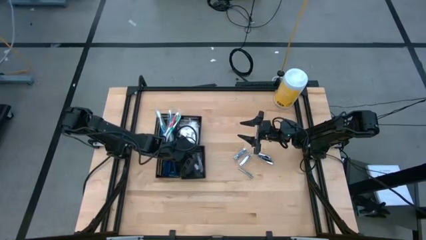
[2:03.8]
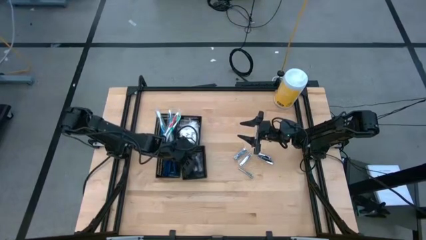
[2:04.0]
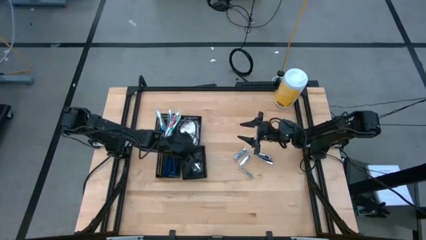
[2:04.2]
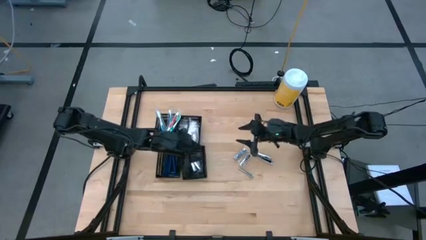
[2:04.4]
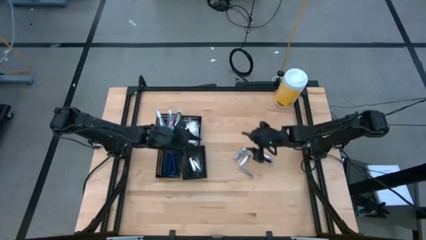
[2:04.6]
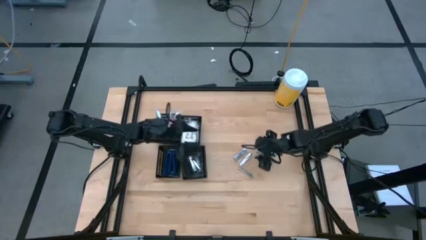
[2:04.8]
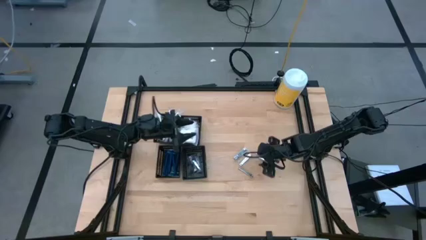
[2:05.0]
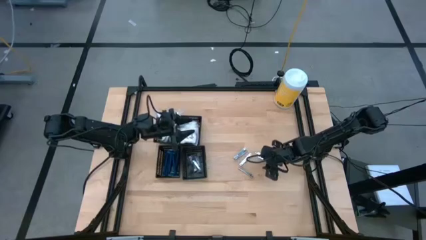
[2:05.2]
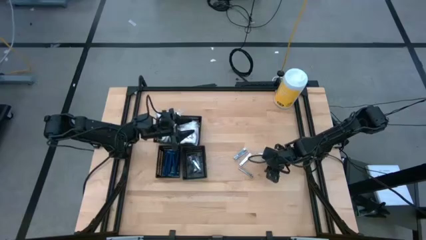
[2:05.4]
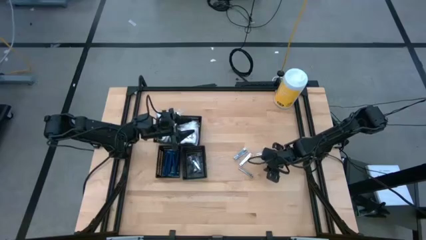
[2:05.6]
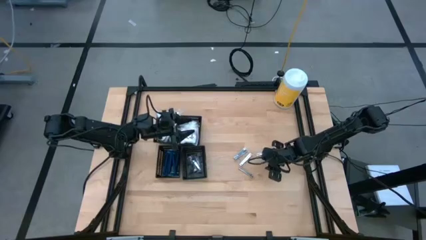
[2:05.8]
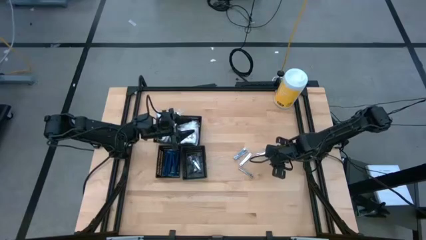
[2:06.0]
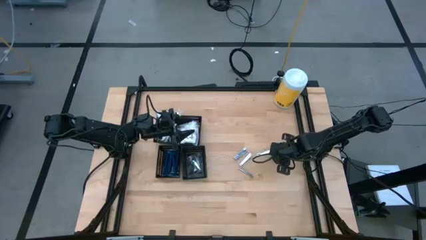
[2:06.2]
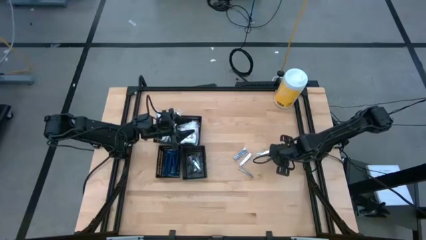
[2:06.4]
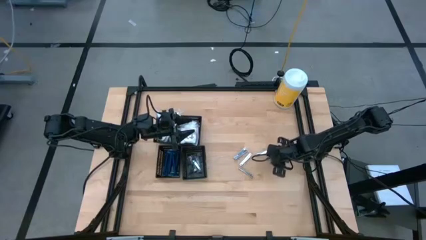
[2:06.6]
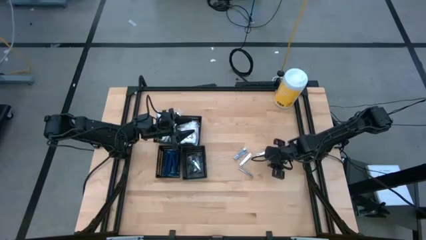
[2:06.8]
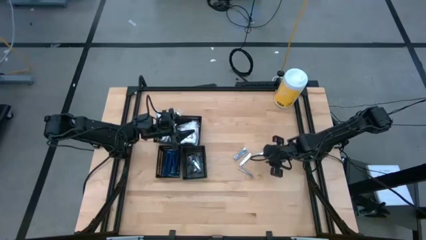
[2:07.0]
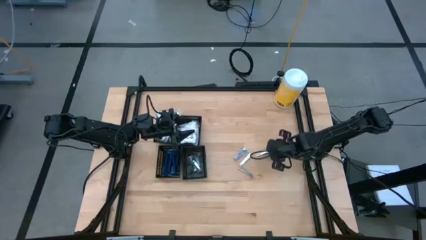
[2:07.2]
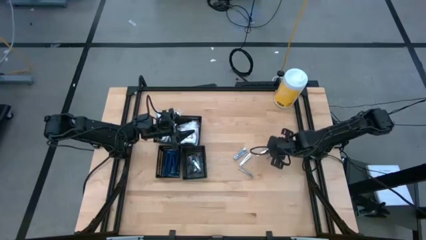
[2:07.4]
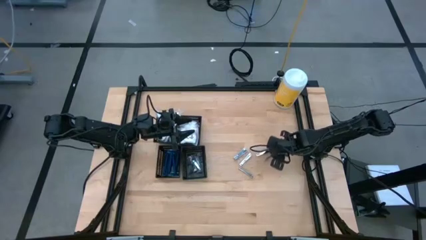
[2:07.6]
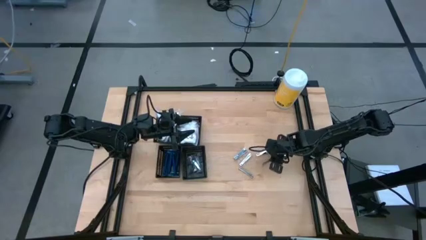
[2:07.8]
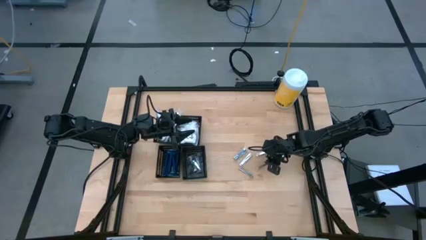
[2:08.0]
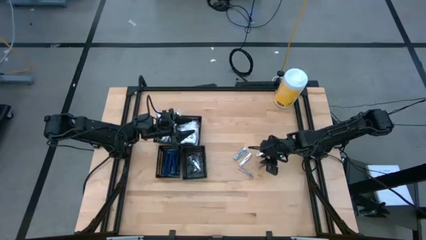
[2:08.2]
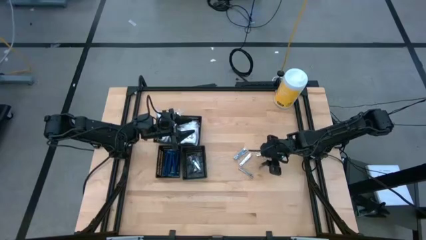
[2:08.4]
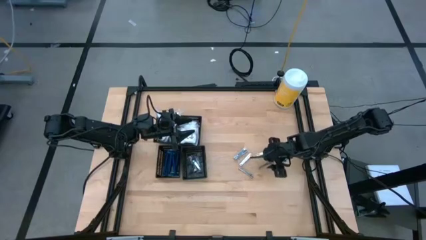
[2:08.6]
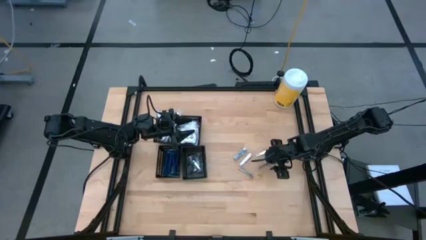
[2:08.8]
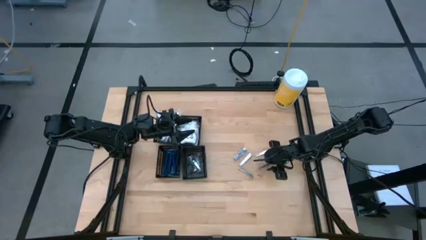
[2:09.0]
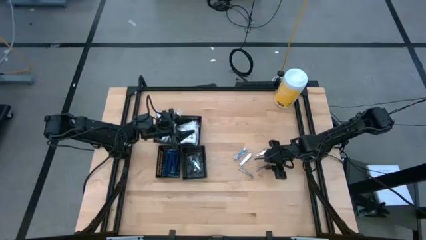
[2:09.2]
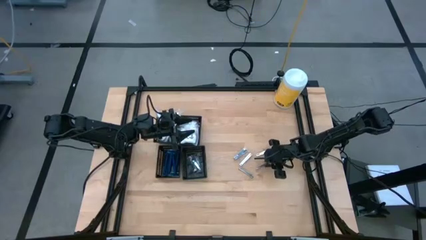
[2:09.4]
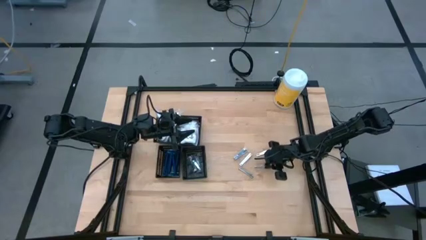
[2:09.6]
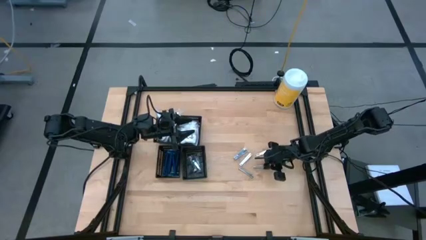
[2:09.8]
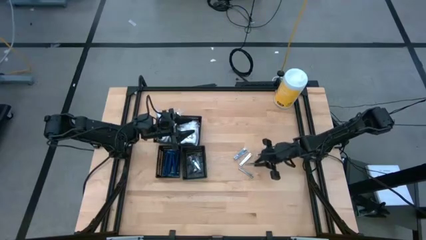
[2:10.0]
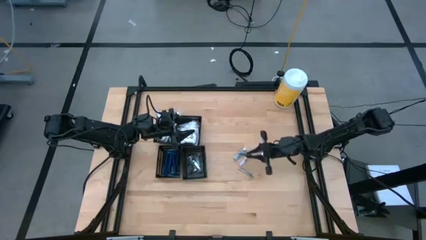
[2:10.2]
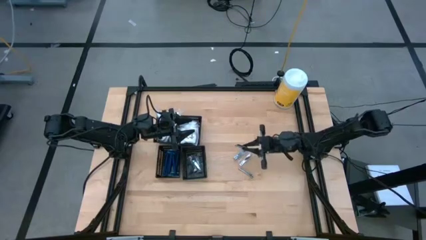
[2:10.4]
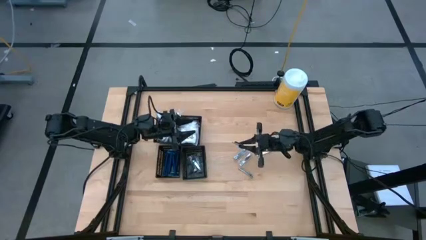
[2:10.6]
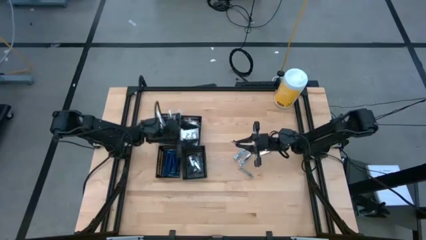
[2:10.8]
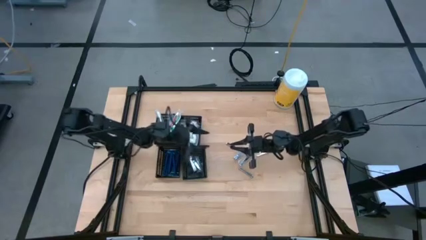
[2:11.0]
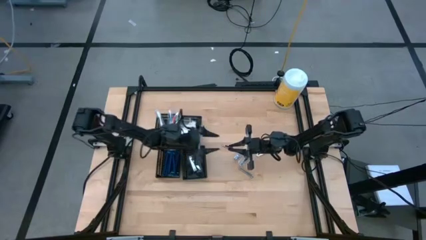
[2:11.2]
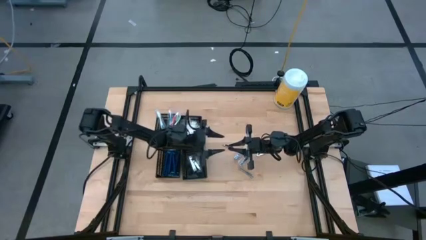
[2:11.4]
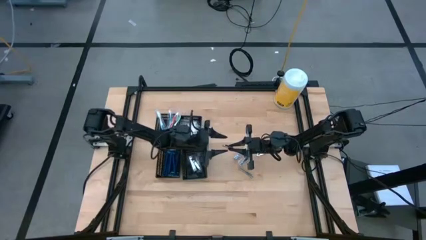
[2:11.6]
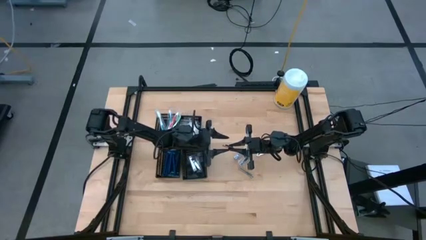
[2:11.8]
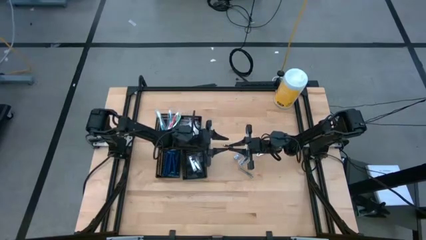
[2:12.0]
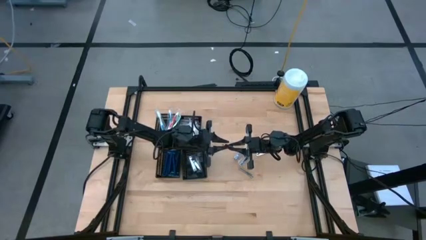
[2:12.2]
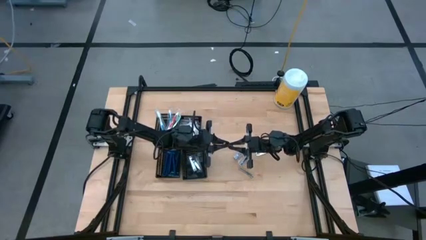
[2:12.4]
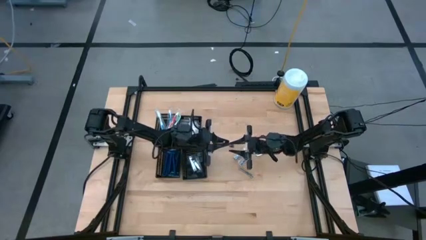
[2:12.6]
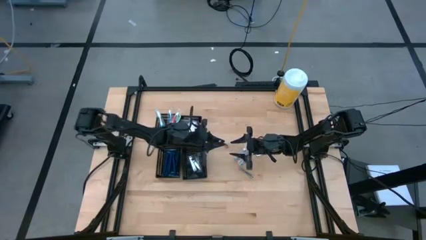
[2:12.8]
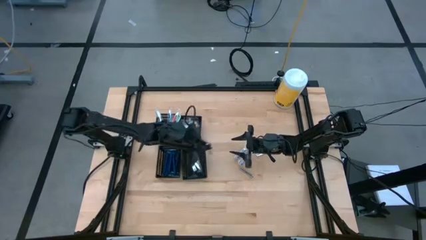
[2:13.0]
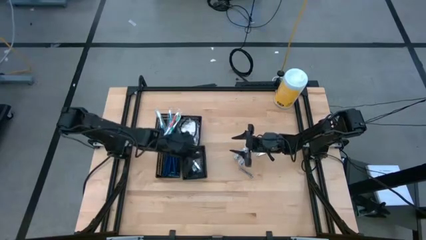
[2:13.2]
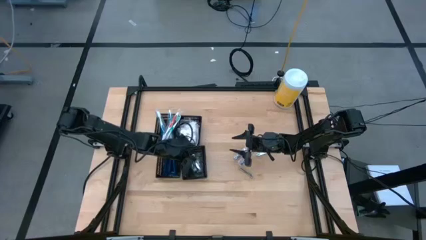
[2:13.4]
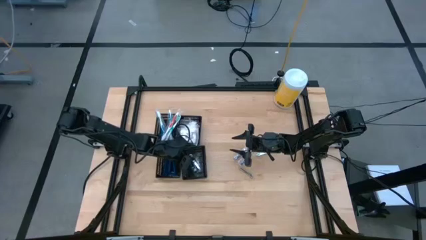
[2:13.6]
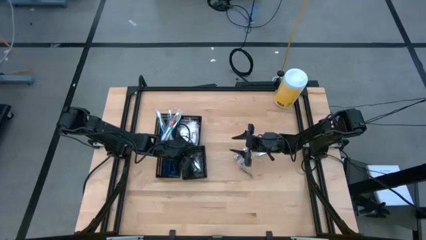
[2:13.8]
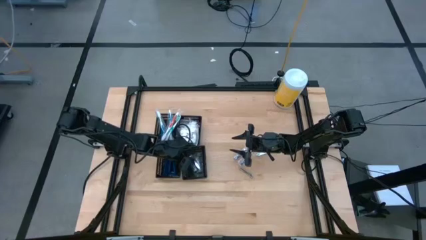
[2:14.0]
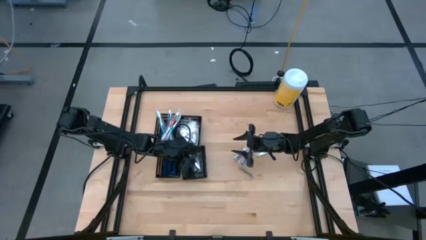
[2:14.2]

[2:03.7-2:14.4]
Task: Pick & Place Travel size toiletries
Put the nail cutter into the bottom right black bin

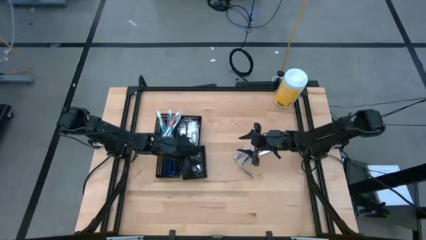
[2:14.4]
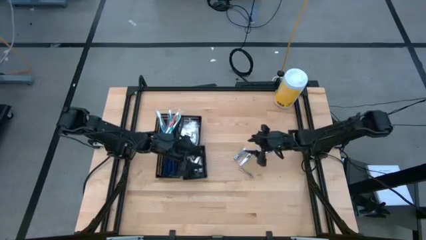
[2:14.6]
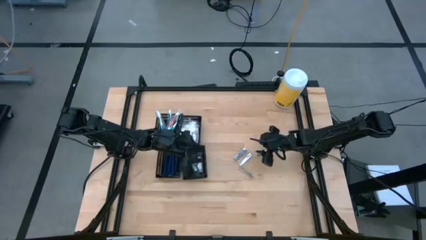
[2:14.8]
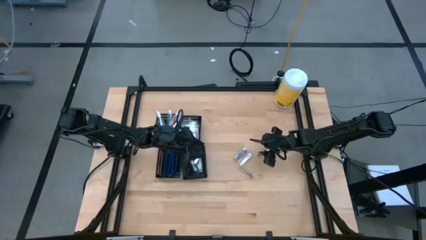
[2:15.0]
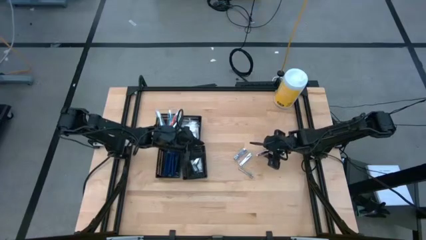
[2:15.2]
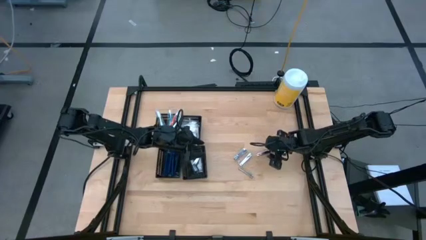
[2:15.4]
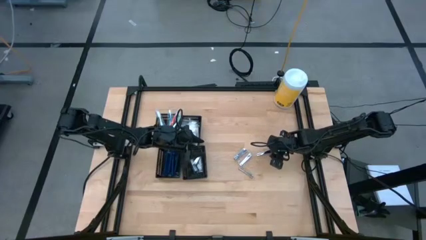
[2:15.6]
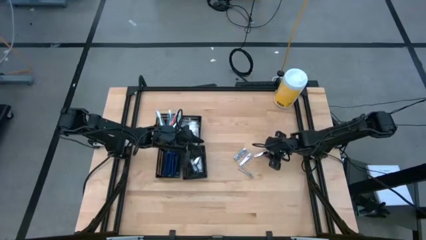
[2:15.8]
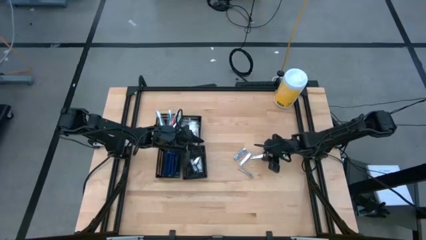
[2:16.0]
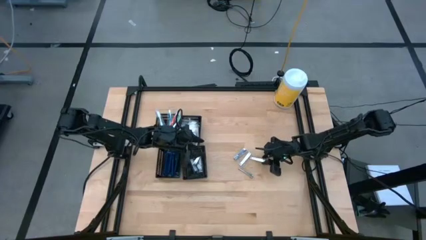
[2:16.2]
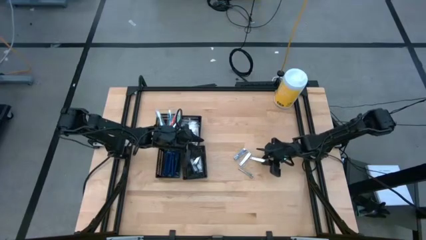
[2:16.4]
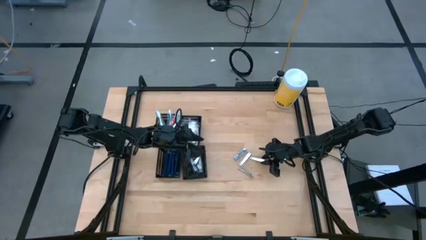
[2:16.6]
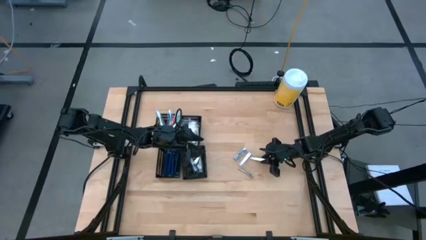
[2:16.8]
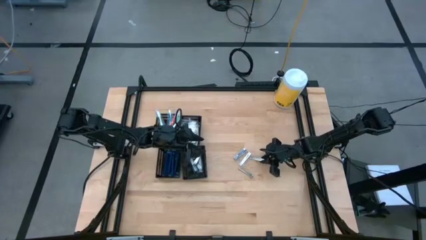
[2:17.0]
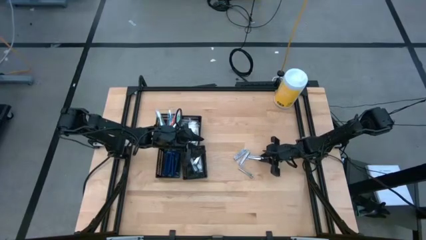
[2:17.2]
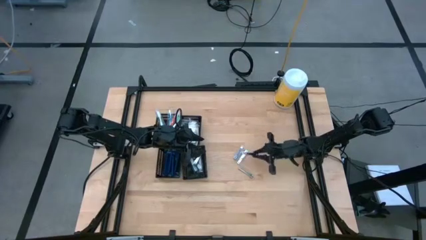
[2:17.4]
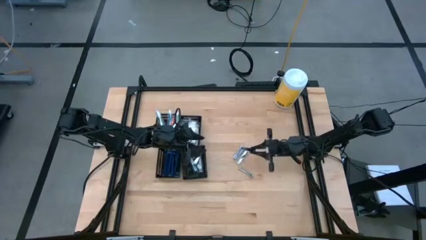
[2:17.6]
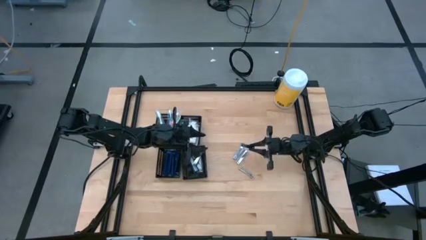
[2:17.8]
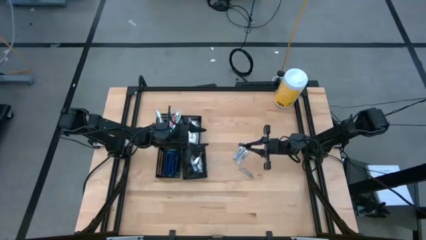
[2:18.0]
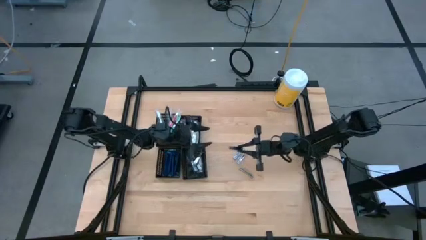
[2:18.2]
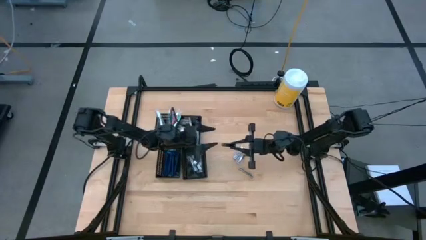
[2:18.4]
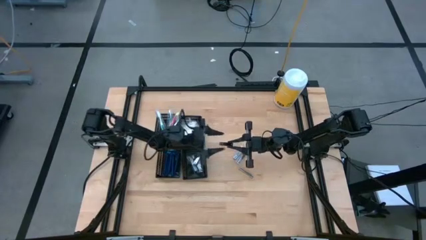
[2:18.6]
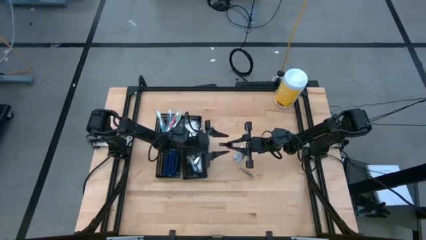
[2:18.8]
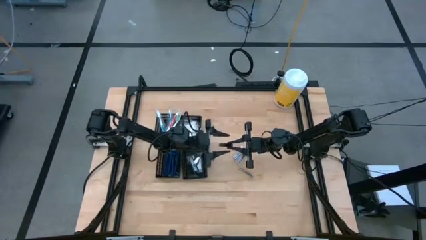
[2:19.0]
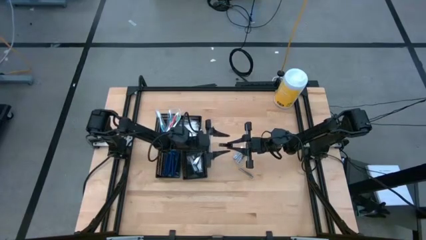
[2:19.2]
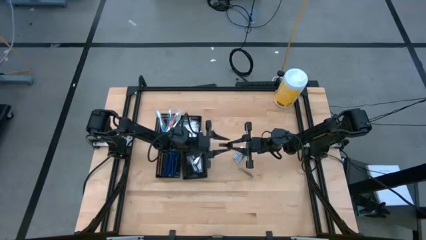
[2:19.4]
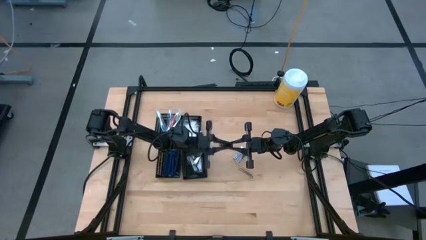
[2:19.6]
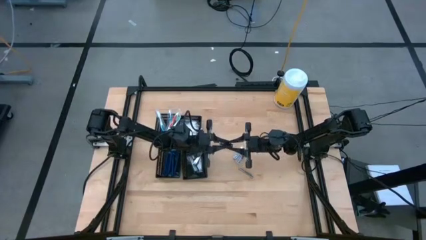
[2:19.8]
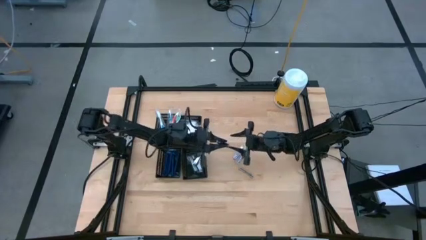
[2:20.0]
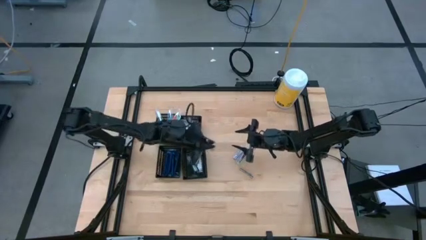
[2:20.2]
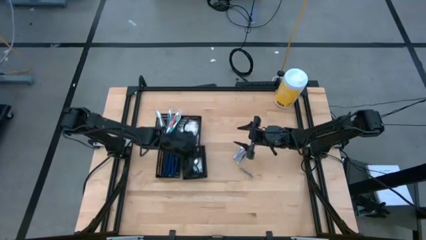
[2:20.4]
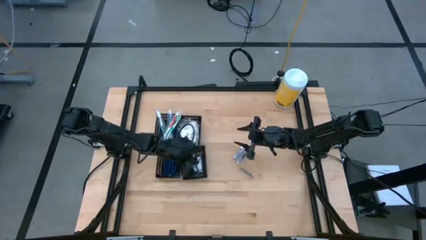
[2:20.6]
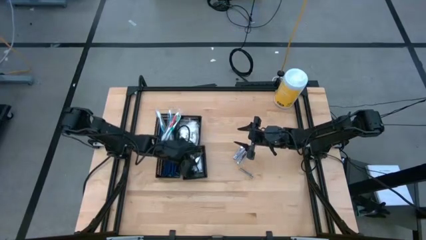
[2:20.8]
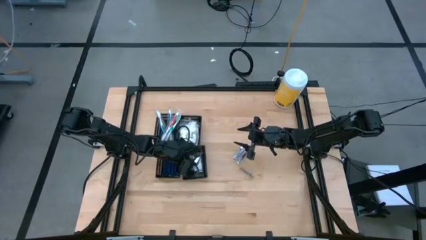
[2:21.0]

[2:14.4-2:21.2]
Put the nail cutter into the bottom right black bin
